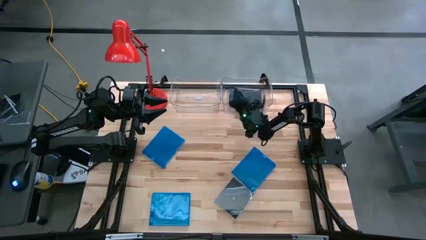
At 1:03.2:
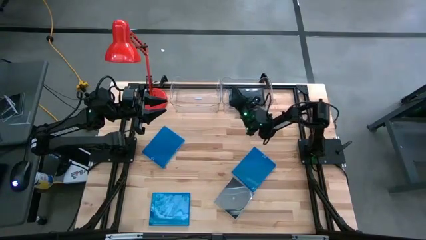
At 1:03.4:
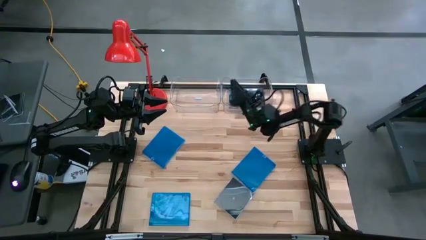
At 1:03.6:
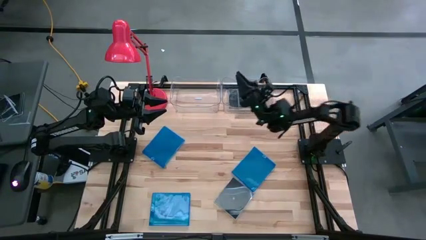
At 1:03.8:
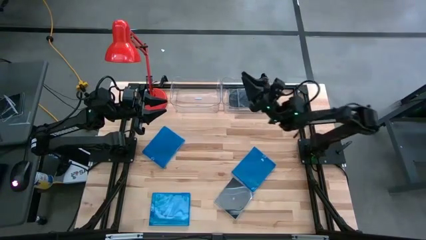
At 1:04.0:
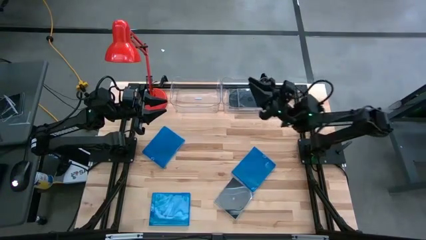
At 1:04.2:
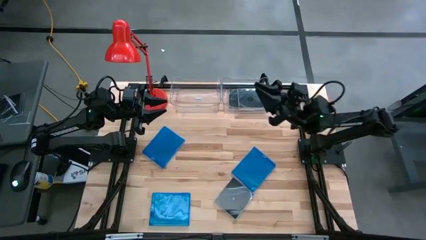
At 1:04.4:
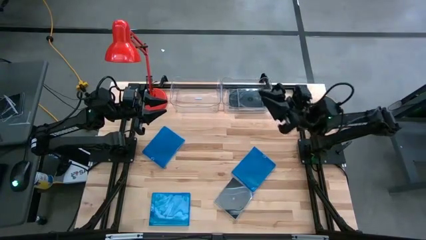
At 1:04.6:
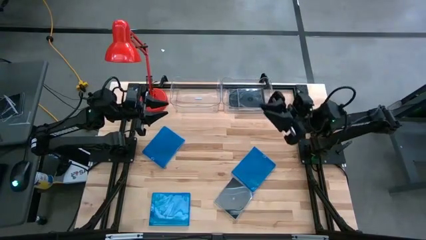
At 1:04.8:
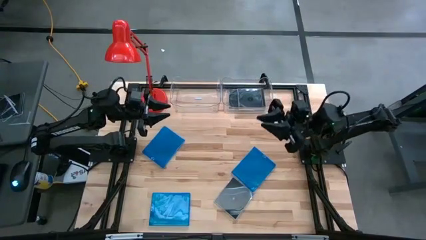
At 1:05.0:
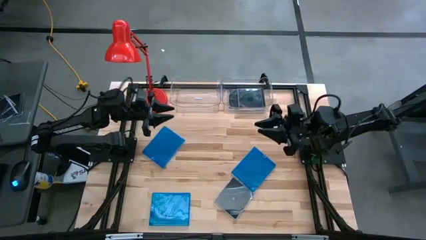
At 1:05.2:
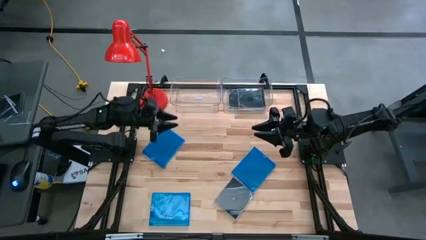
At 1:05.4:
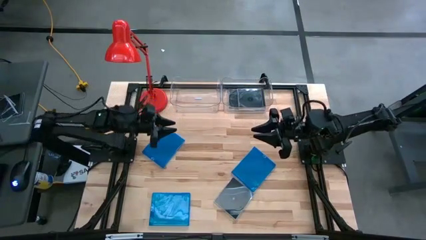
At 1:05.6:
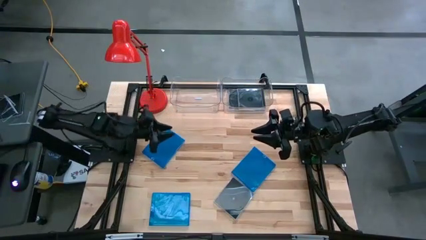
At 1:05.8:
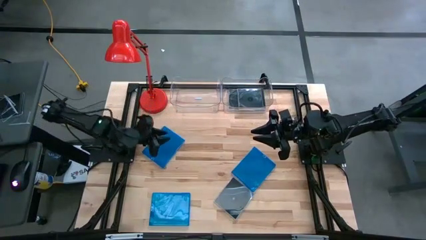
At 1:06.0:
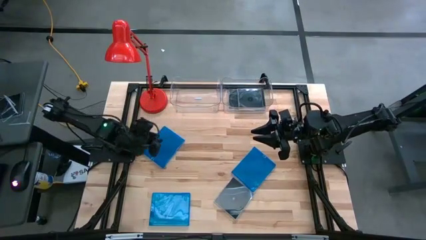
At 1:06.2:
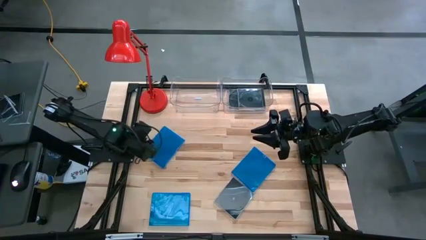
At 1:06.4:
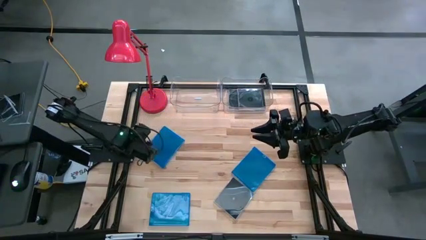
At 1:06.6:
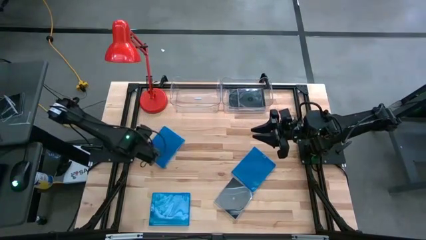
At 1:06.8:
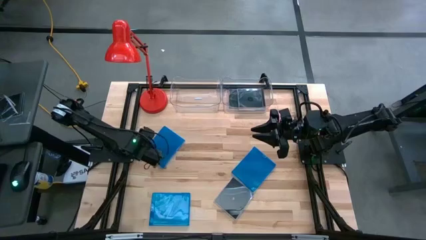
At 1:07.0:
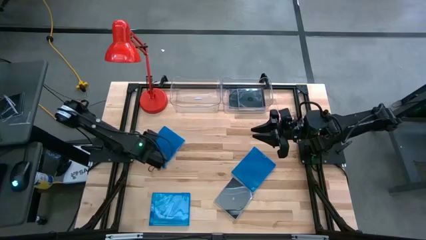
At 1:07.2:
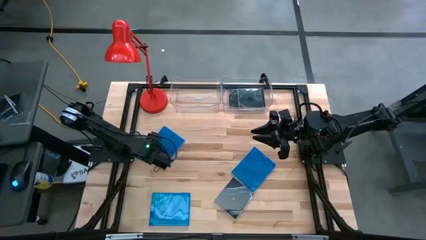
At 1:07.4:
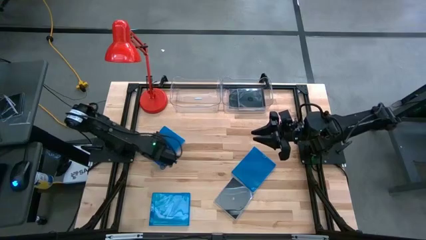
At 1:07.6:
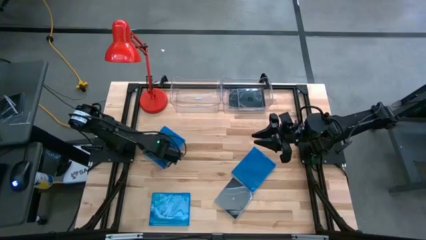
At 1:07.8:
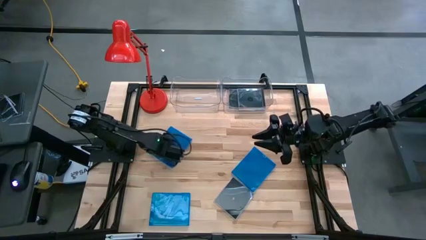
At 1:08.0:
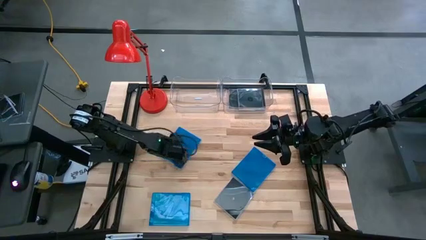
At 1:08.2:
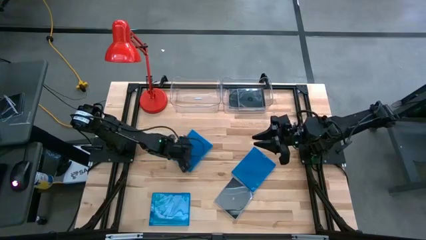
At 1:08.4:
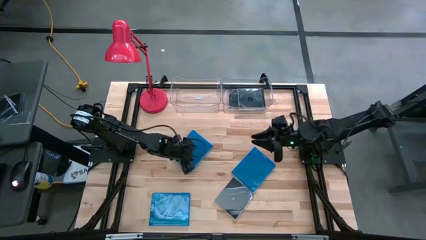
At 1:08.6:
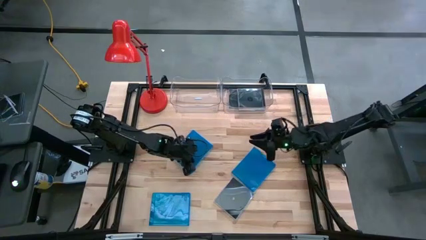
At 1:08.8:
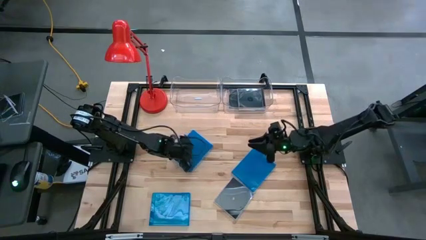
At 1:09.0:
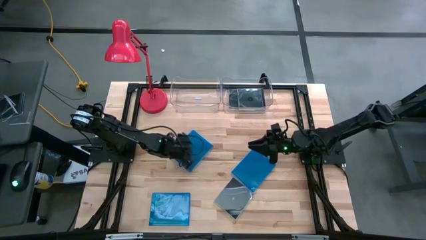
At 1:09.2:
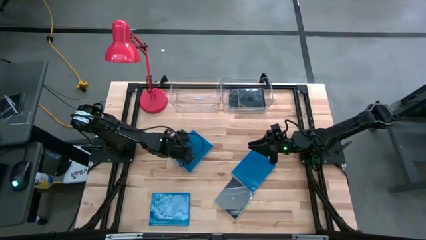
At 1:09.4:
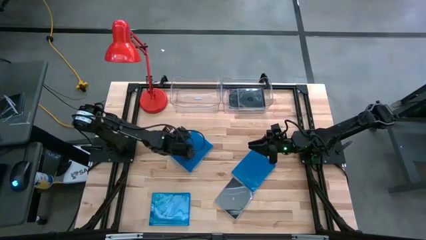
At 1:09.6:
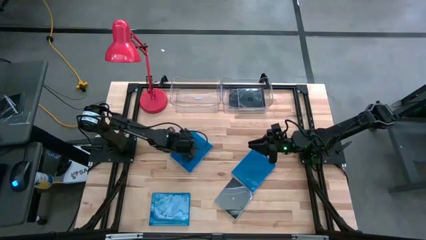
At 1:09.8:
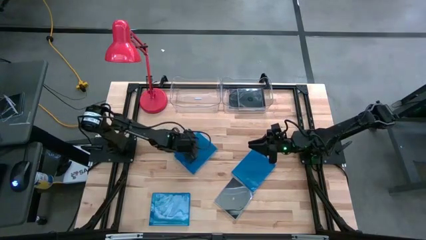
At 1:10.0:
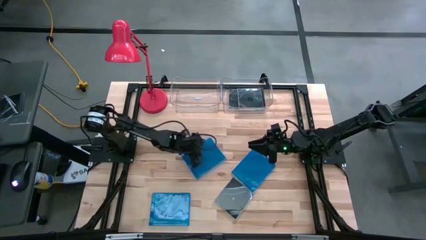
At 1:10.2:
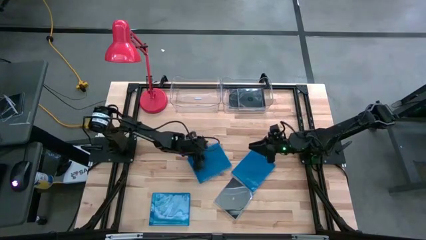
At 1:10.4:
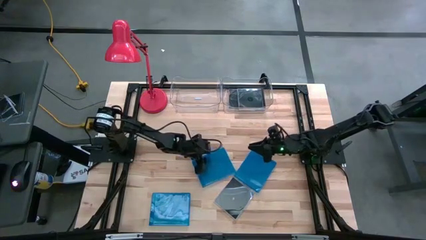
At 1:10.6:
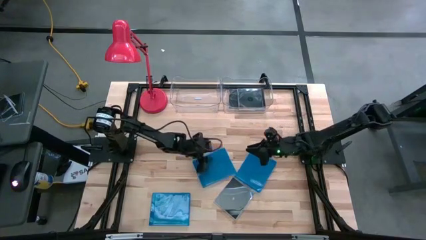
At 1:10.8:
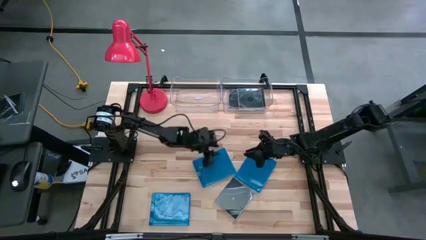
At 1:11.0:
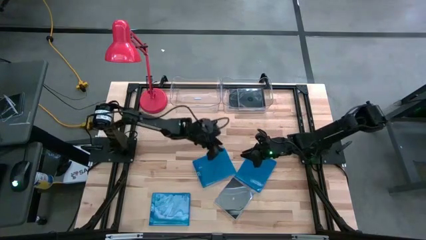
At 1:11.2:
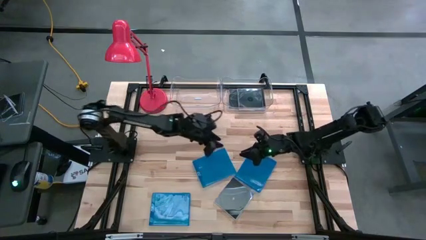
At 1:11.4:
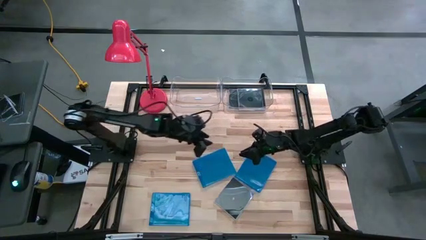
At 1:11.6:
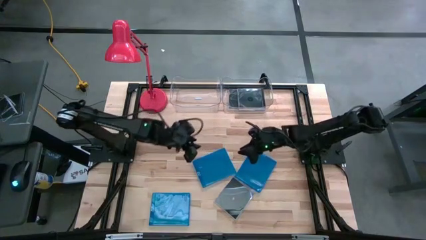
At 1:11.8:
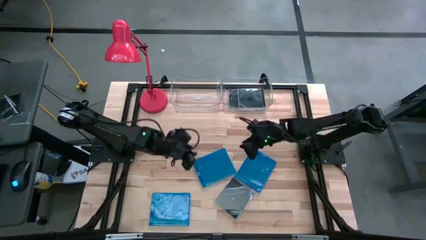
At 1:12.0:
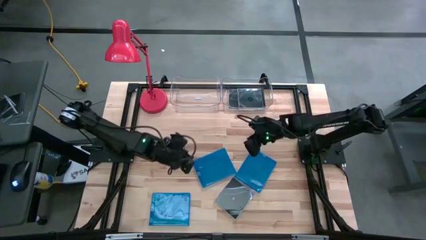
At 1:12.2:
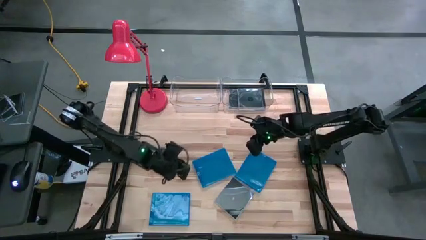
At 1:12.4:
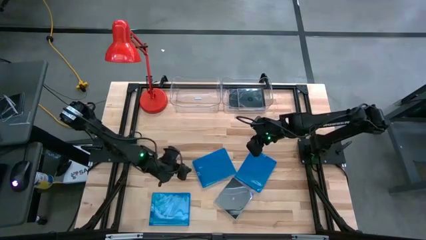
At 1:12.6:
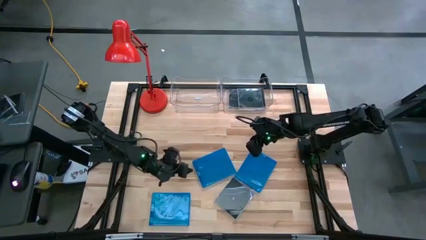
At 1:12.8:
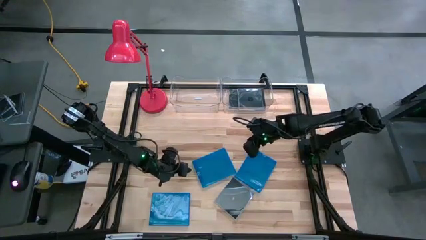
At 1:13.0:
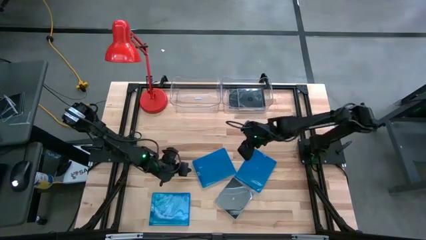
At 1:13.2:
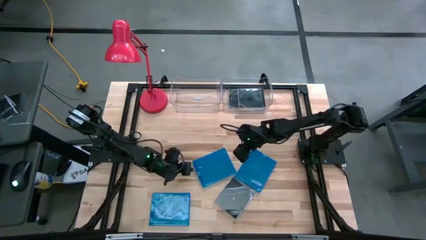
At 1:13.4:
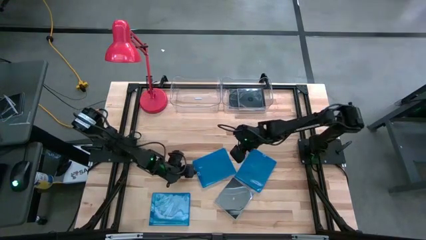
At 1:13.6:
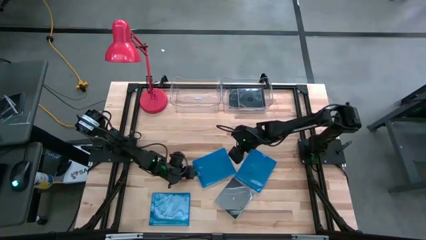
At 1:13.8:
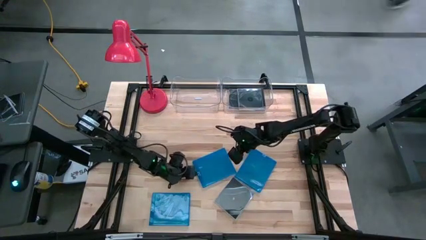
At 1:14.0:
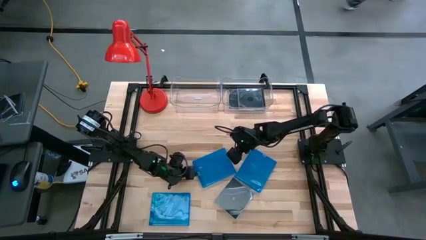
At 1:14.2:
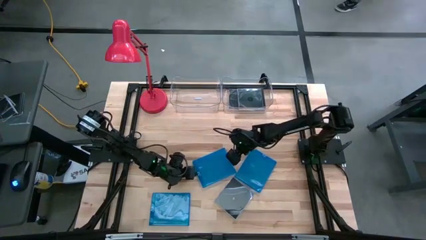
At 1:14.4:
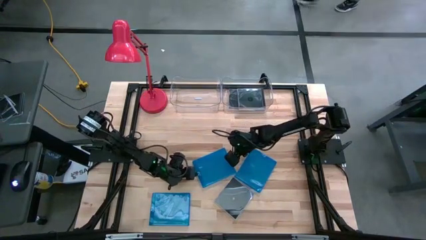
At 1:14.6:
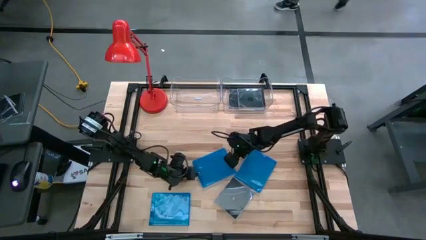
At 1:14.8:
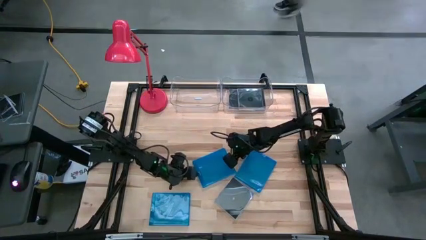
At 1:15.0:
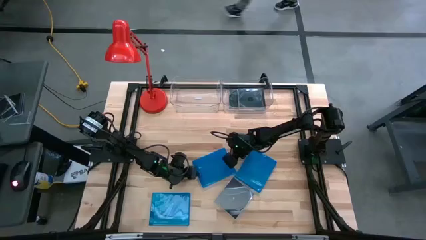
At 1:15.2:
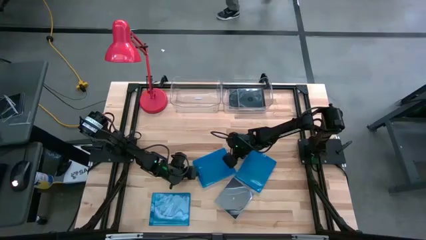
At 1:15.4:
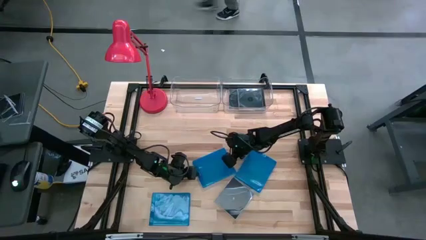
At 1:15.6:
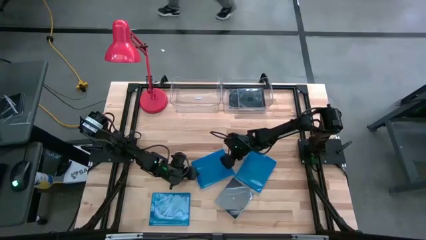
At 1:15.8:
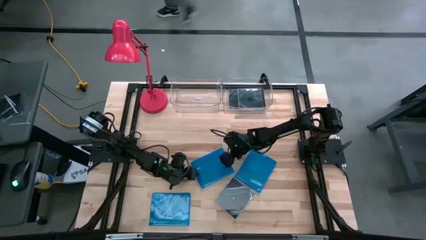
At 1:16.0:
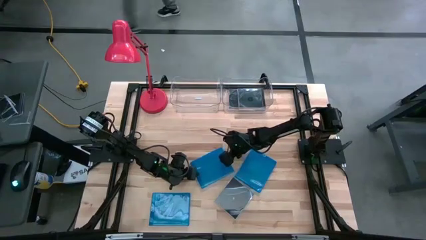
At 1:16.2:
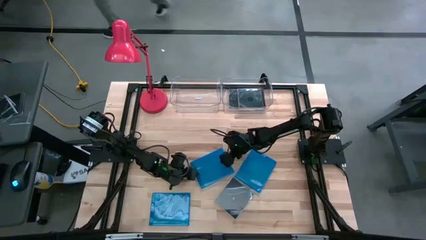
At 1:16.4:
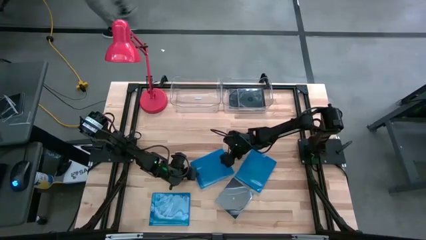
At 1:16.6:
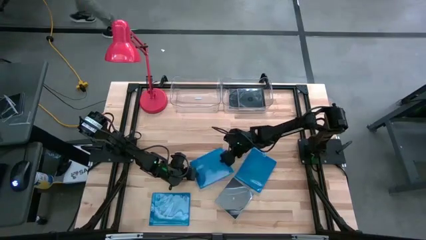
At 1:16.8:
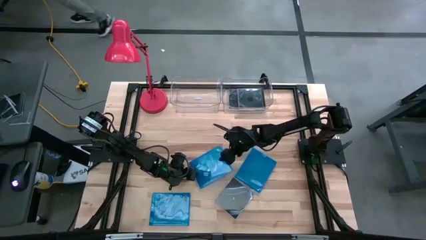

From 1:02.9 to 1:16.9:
Task: Pick & place jewel cases by type
Put the top left blue cd case into the left transparent bin
